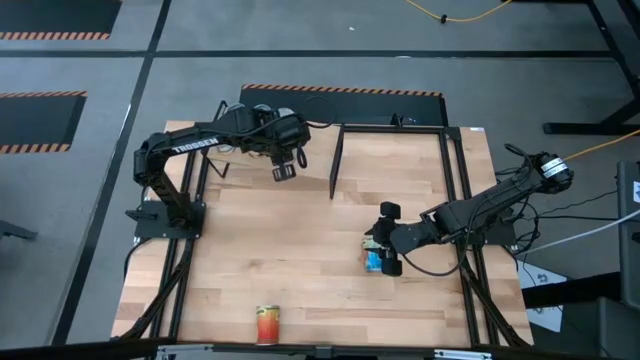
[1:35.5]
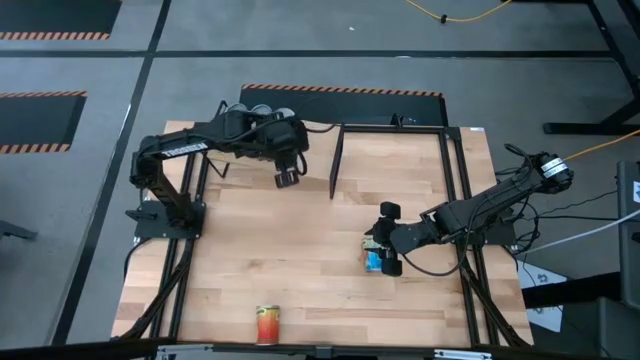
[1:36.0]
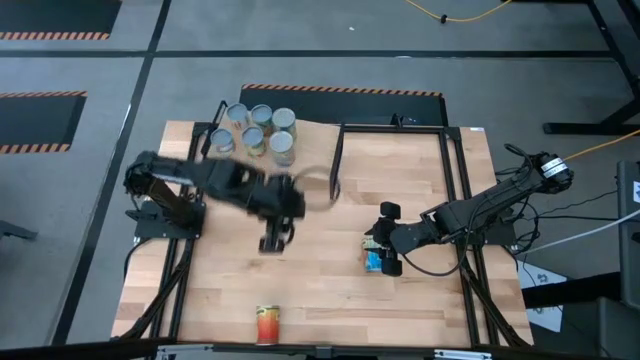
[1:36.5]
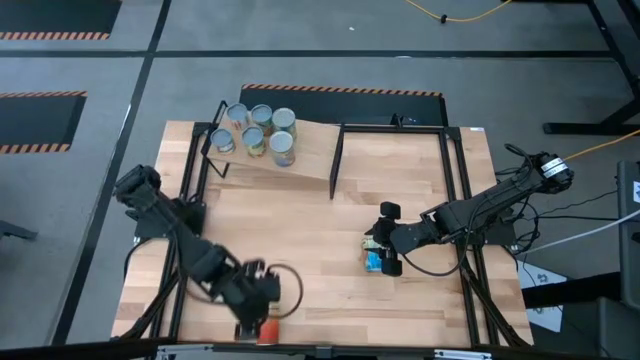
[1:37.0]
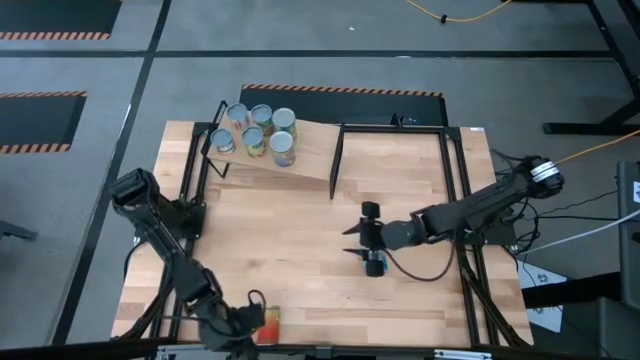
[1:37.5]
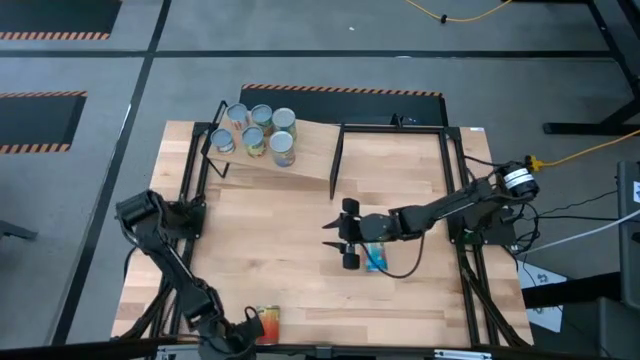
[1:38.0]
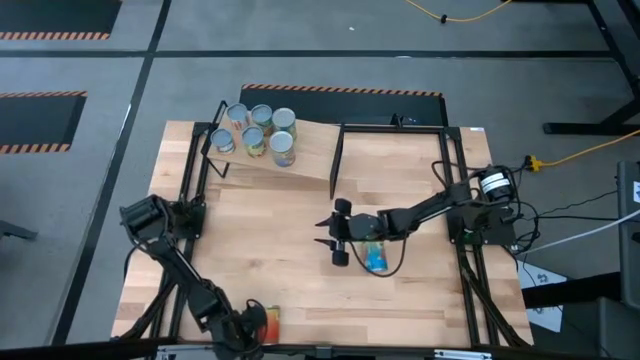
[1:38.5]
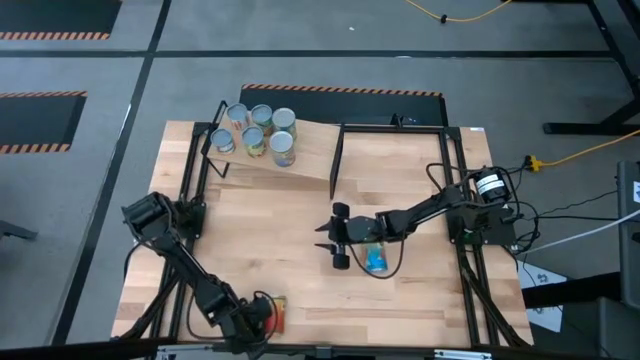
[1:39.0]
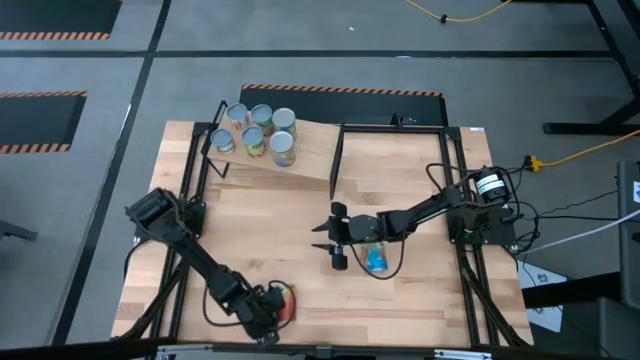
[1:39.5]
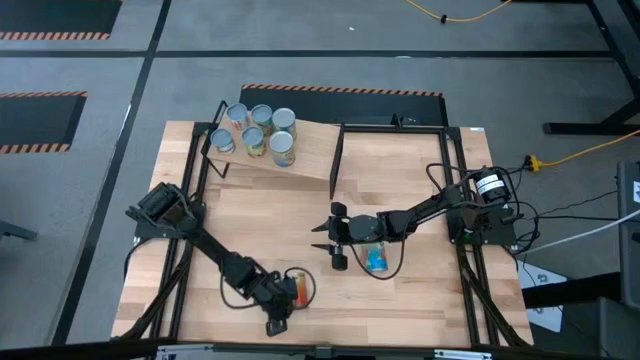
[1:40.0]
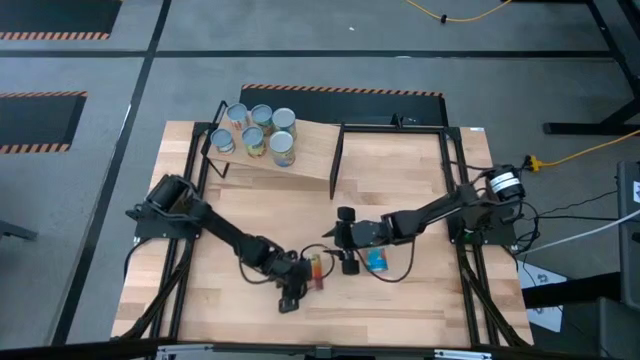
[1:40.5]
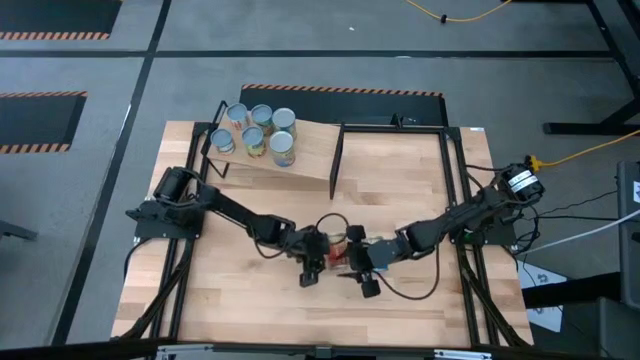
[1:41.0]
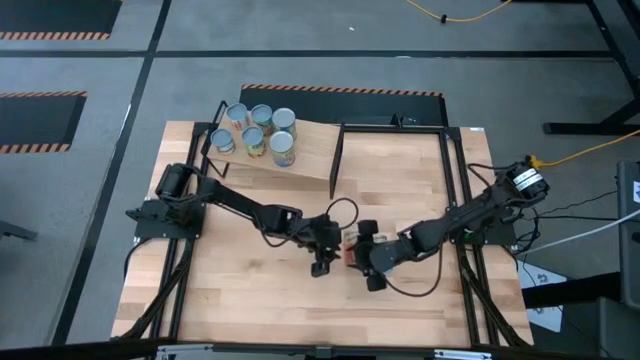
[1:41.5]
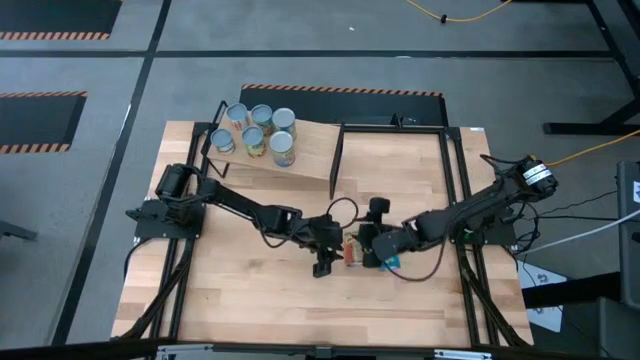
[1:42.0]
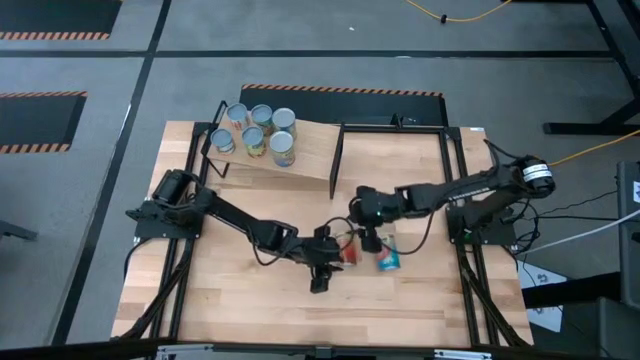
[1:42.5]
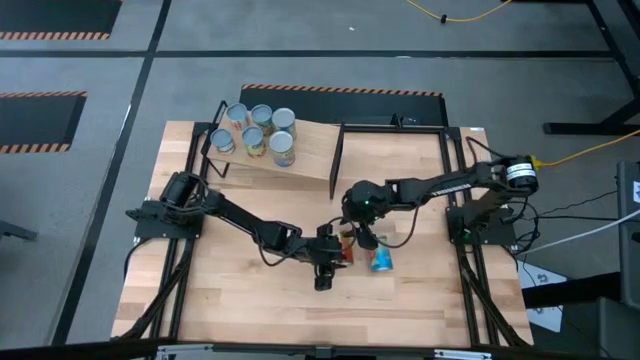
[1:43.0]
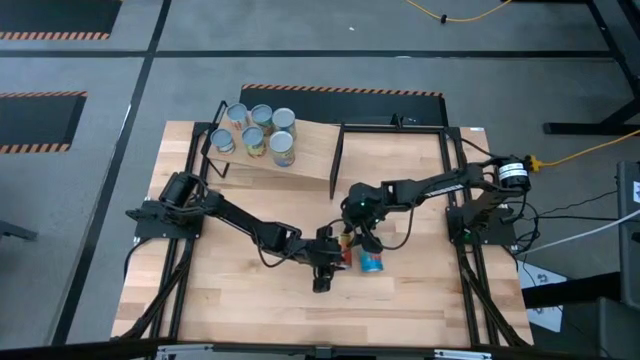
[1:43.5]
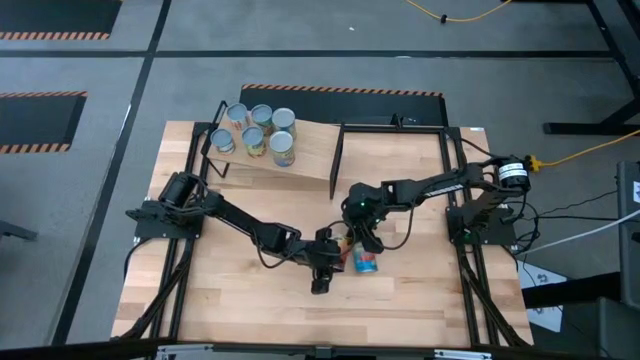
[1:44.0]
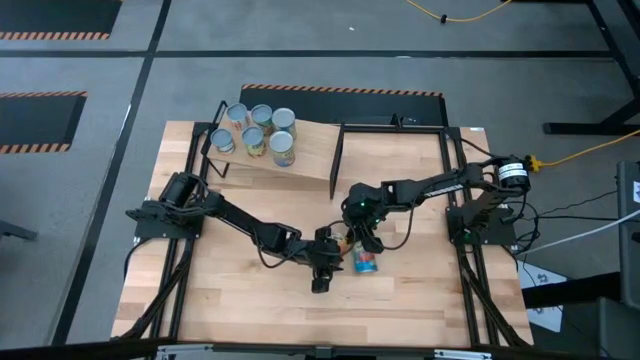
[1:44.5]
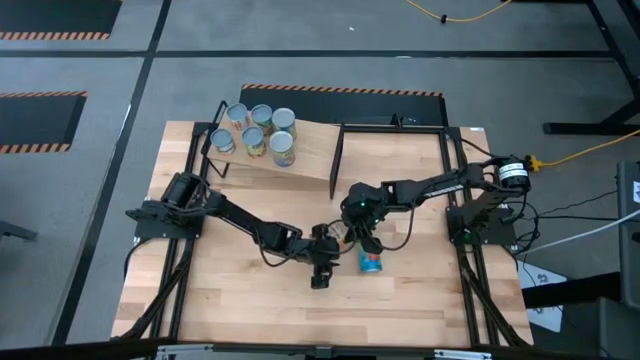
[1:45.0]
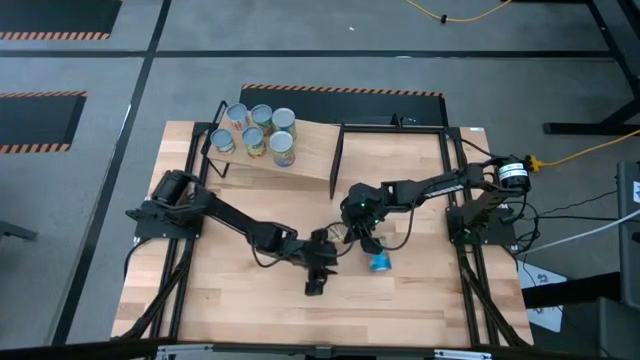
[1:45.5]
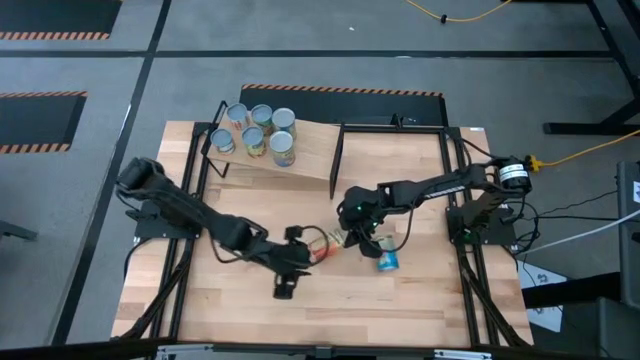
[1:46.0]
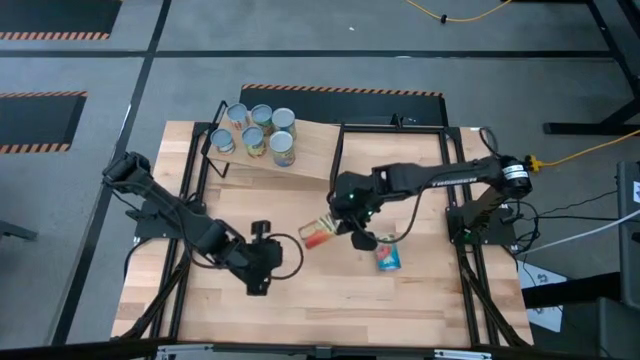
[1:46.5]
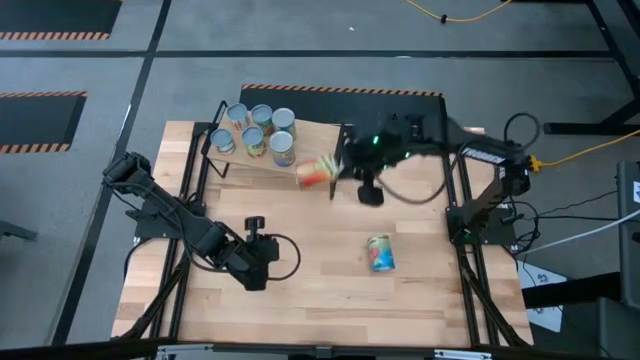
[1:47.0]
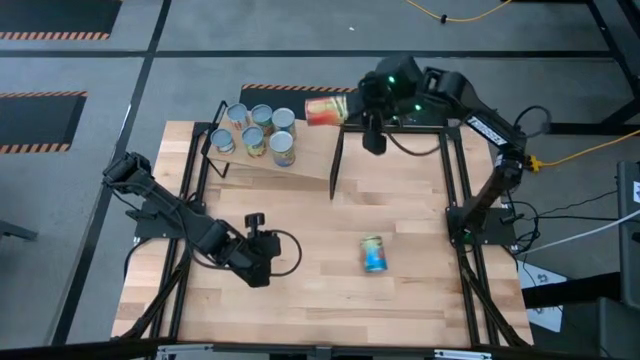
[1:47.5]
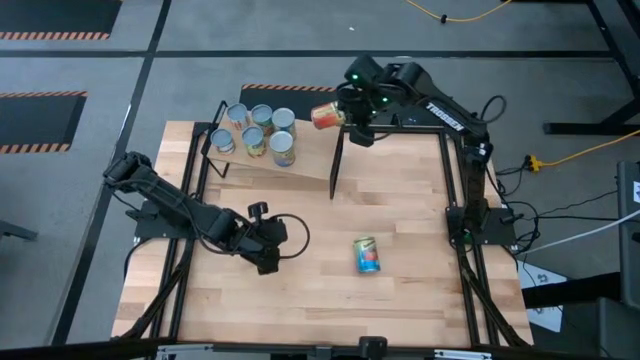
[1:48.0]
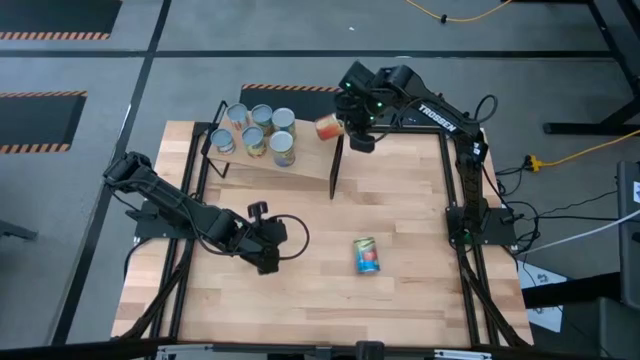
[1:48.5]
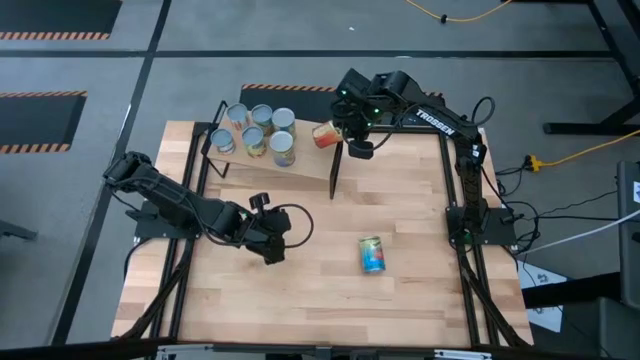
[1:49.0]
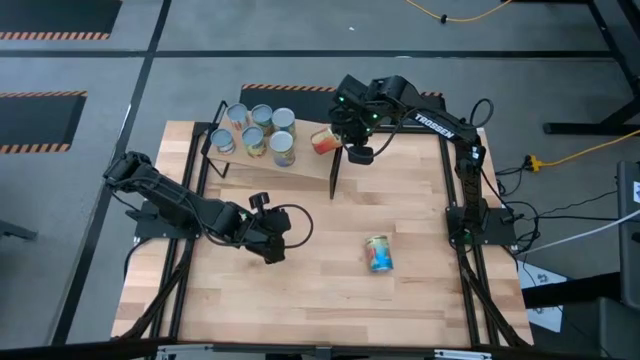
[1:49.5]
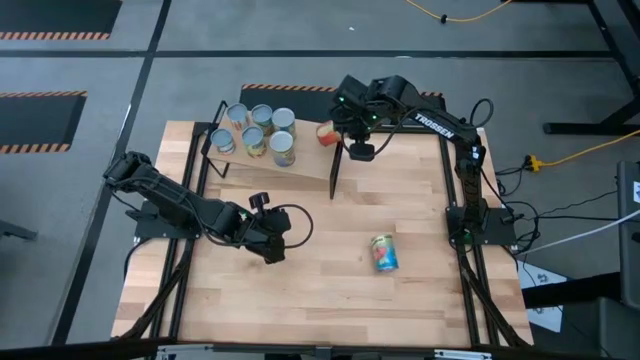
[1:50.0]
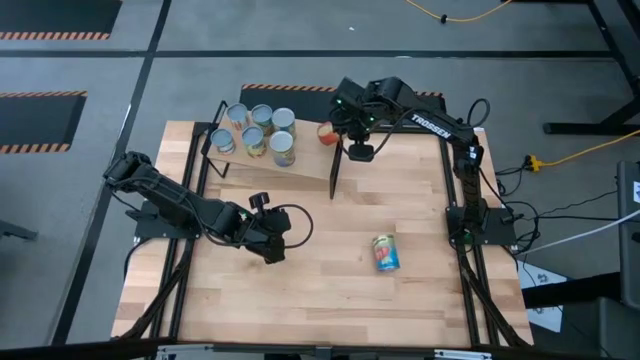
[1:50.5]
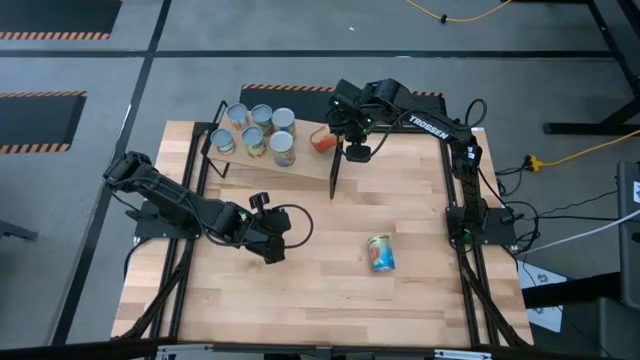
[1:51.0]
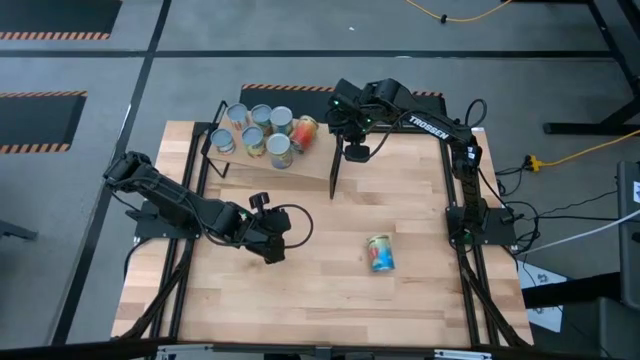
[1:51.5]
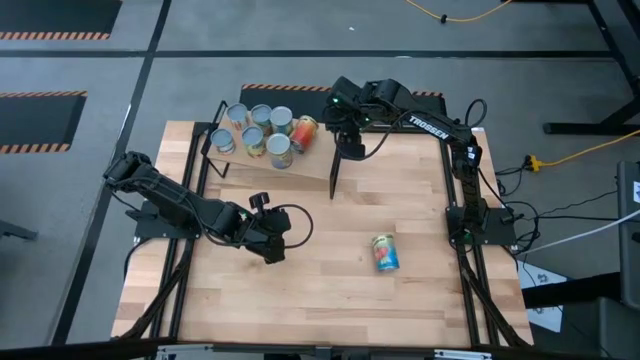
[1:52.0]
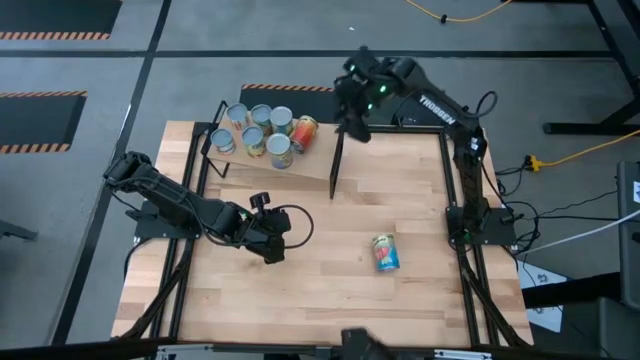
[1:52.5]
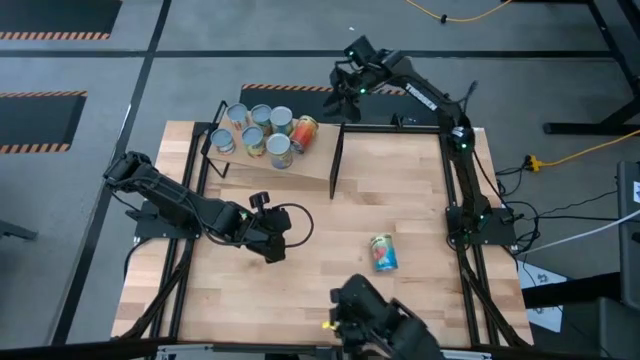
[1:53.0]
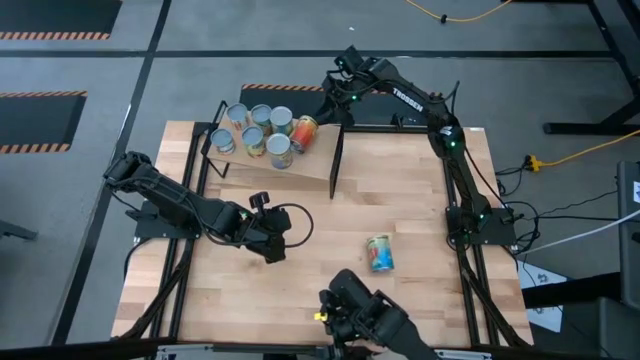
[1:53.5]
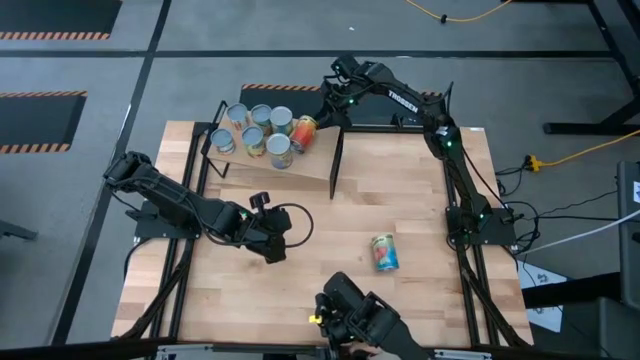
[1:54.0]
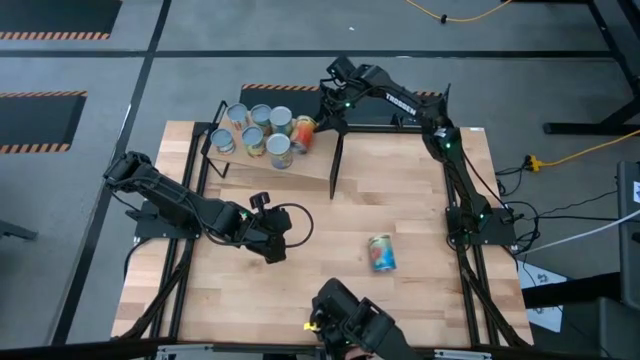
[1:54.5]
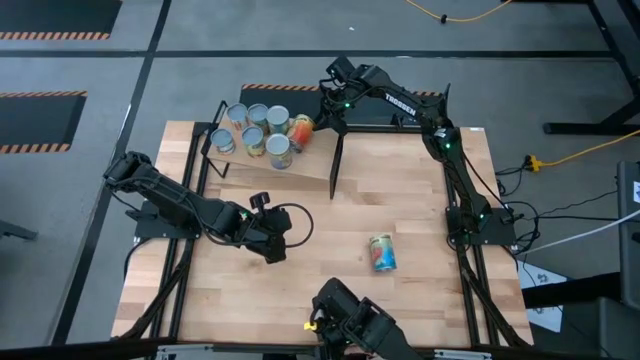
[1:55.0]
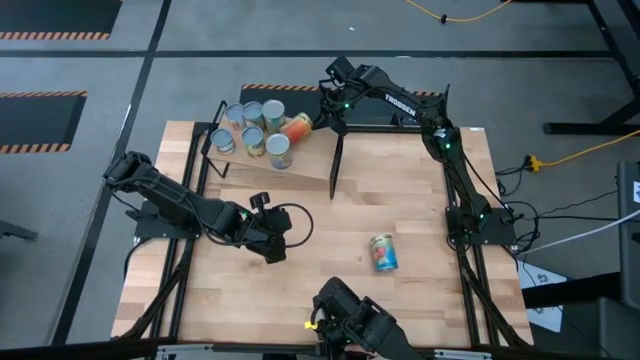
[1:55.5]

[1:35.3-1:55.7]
Task: Pick and place cans onto a shelf
Put the canned pineapple on the shelf
